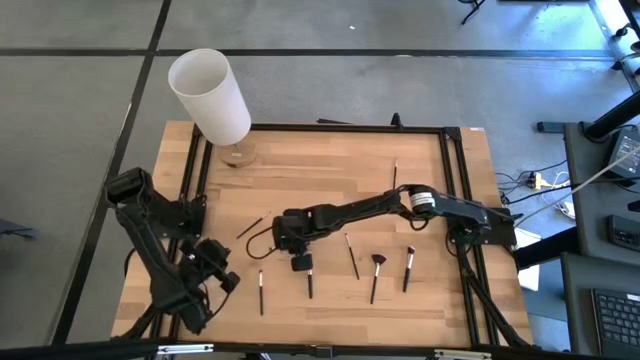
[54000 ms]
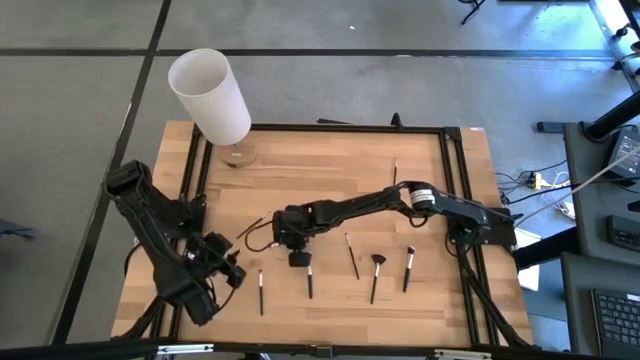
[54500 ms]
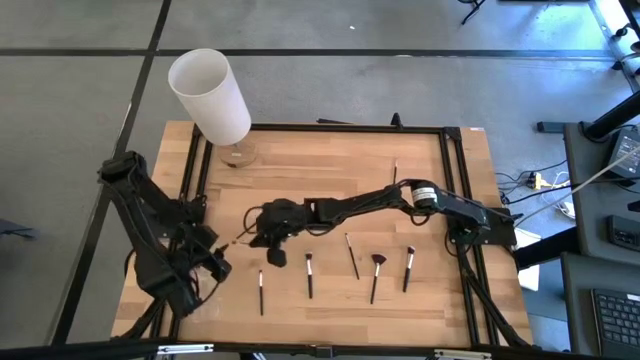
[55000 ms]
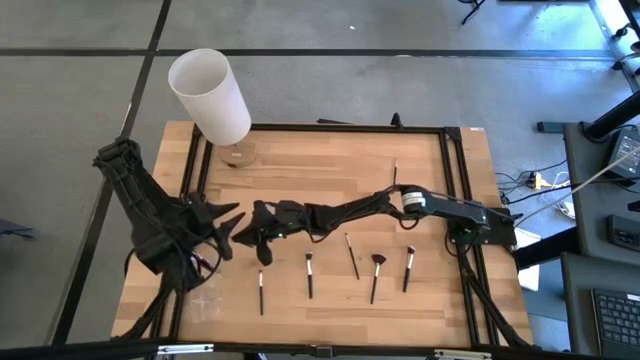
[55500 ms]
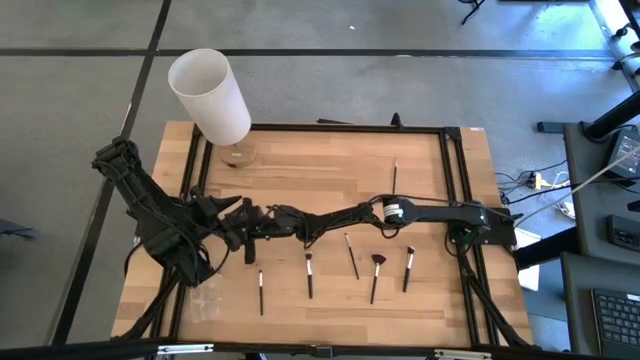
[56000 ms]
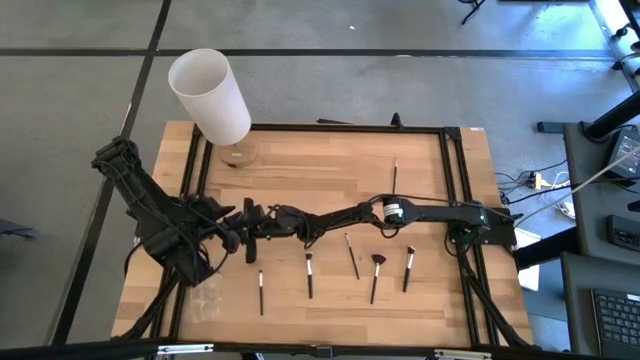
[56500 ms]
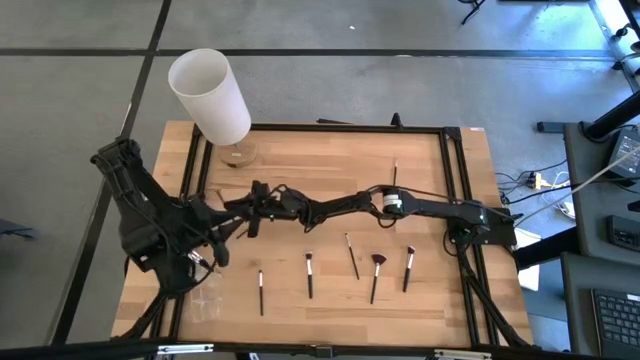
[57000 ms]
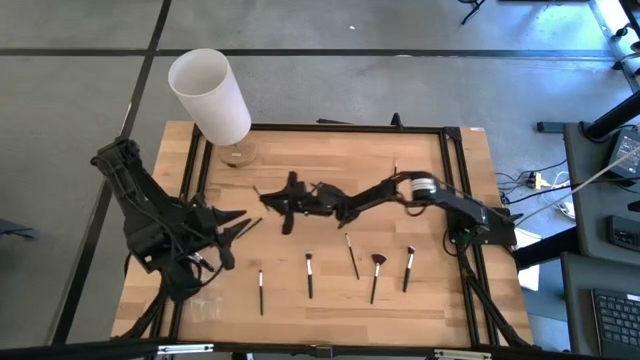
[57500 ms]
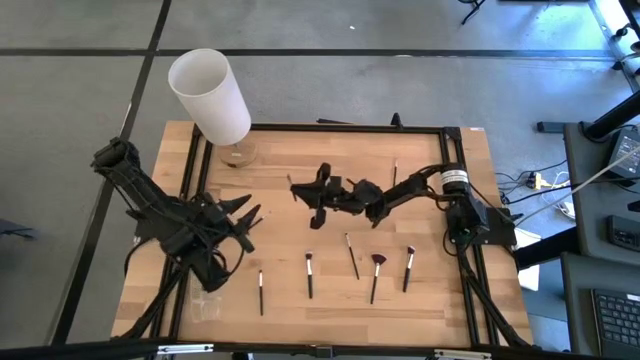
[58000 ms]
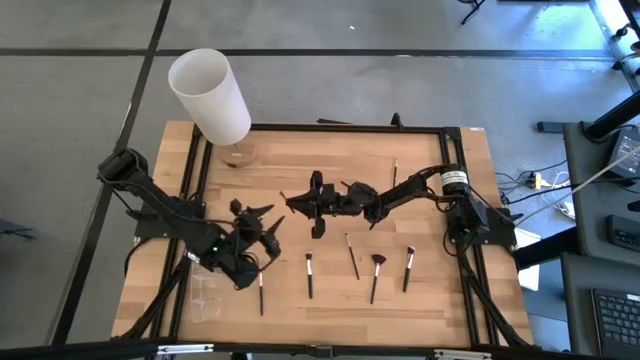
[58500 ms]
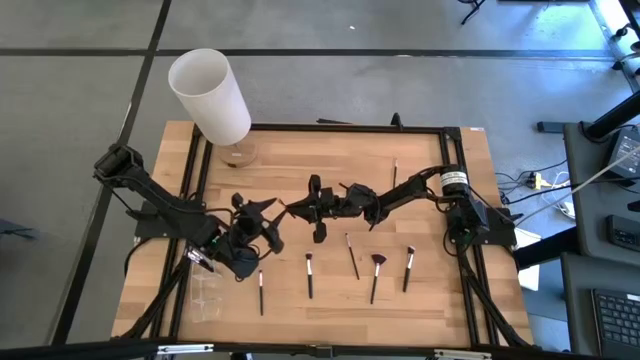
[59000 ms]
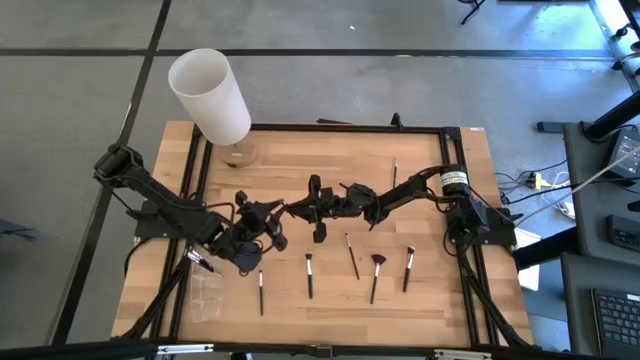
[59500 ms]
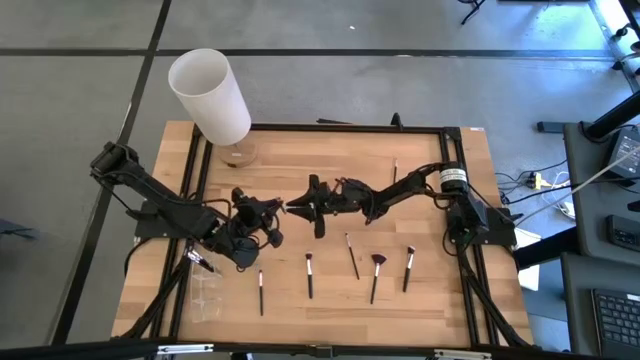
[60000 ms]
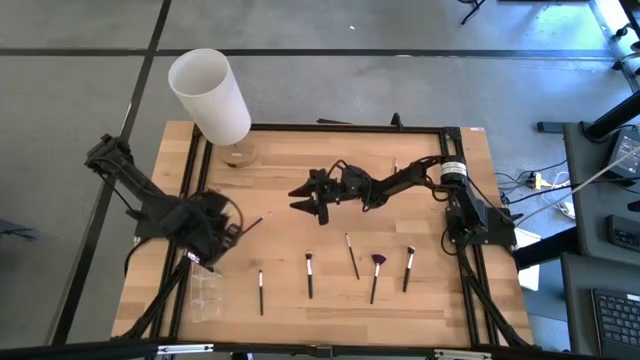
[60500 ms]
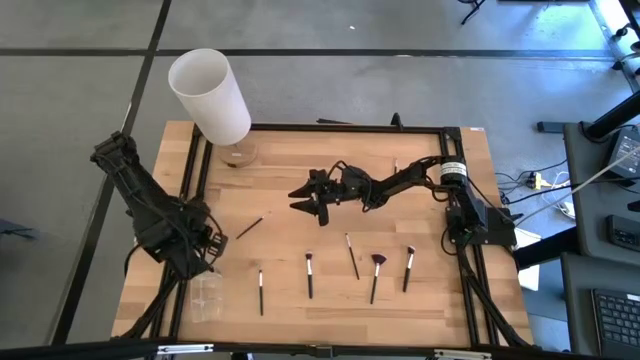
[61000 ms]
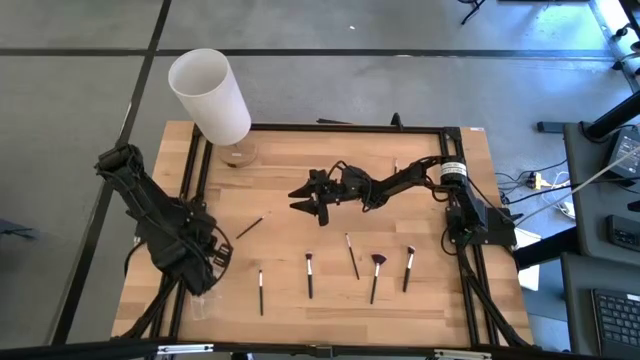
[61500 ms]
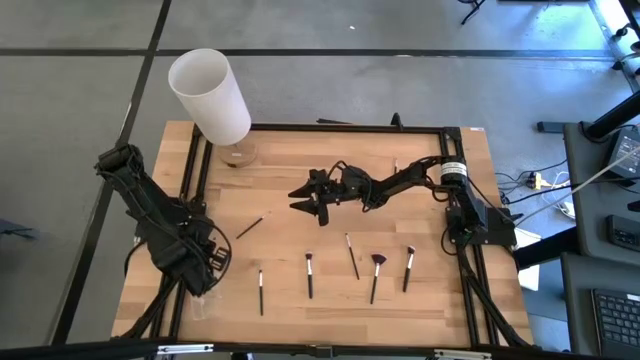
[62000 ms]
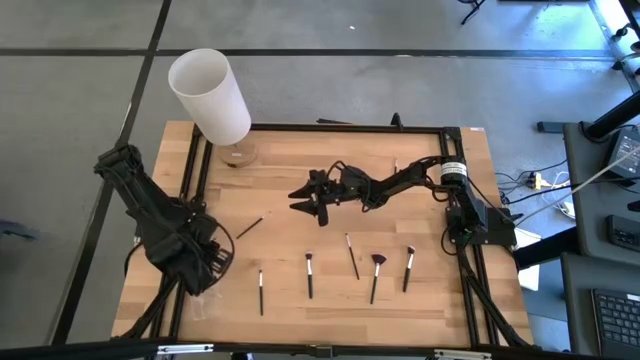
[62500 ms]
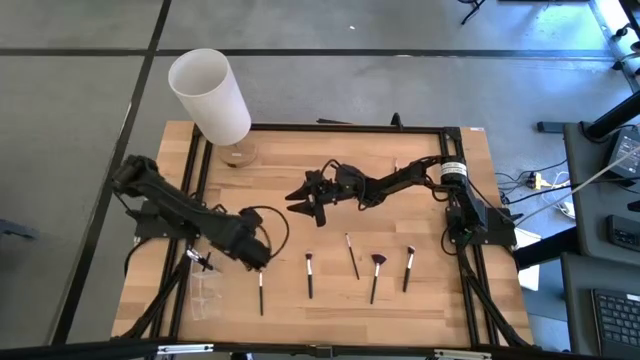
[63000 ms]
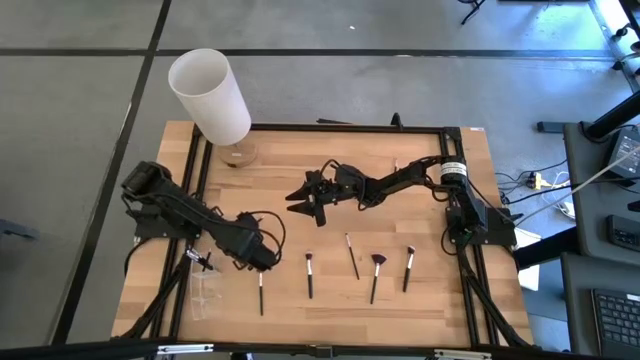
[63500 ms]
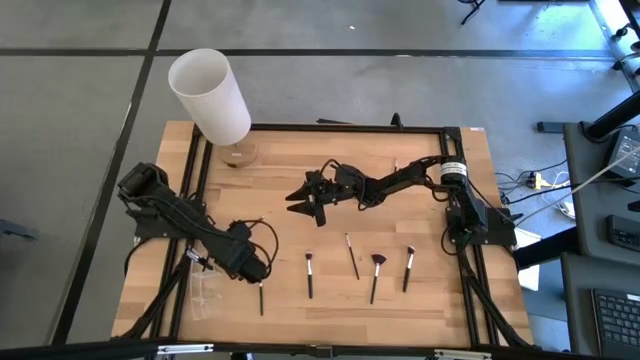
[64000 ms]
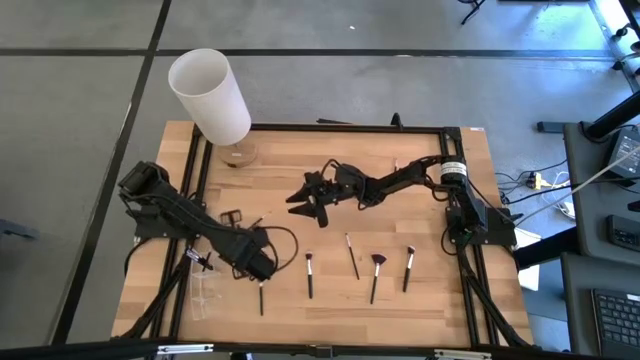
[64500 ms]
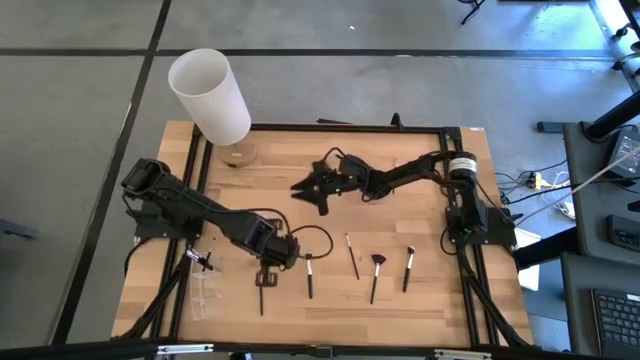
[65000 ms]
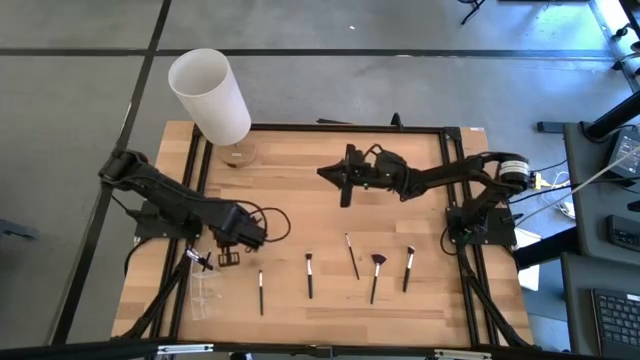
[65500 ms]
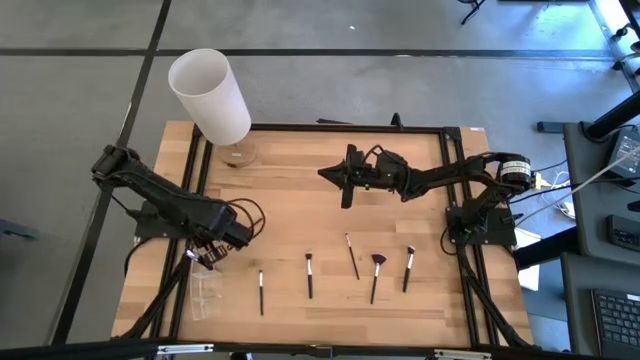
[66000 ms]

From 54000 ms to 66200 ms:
Task: Put items in baskets/containers
Put the eyeshadow brush into the transparent organizer

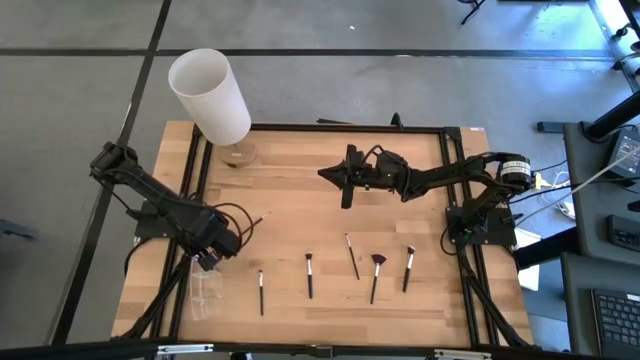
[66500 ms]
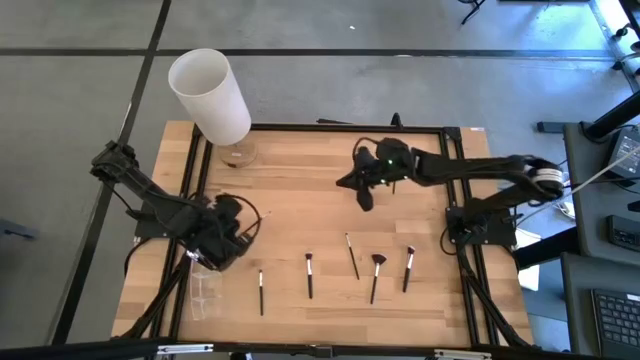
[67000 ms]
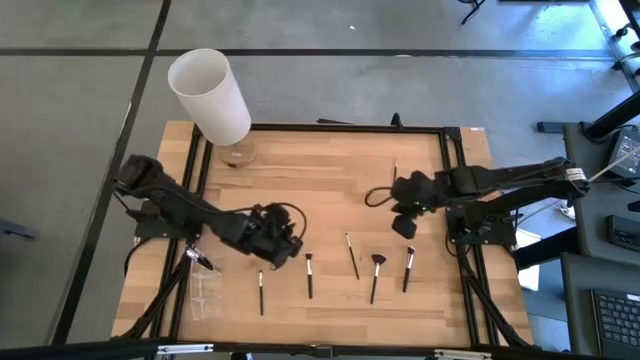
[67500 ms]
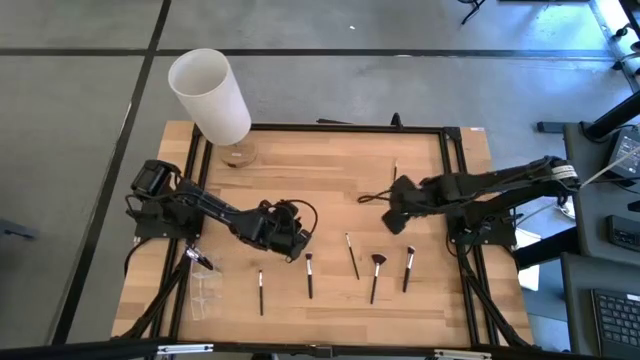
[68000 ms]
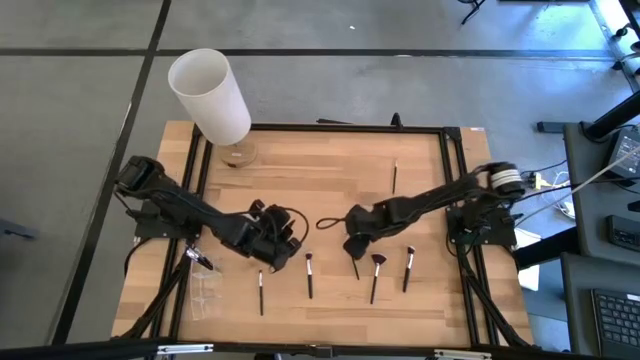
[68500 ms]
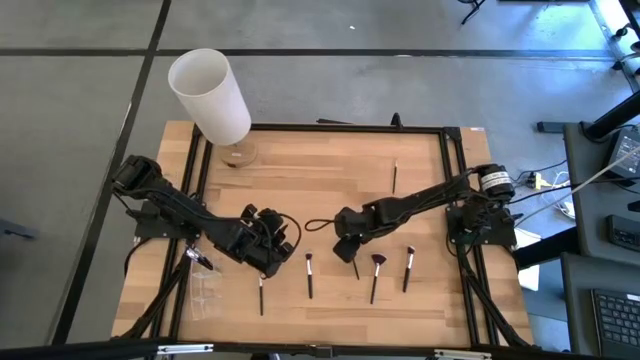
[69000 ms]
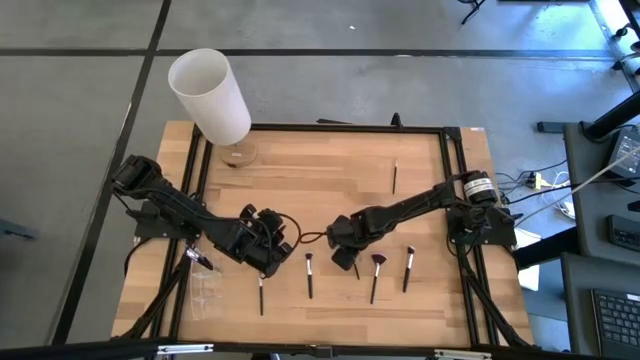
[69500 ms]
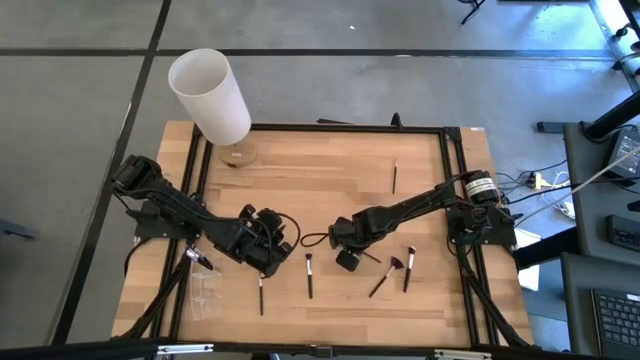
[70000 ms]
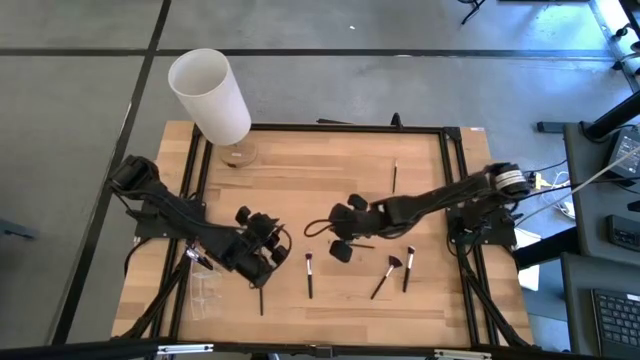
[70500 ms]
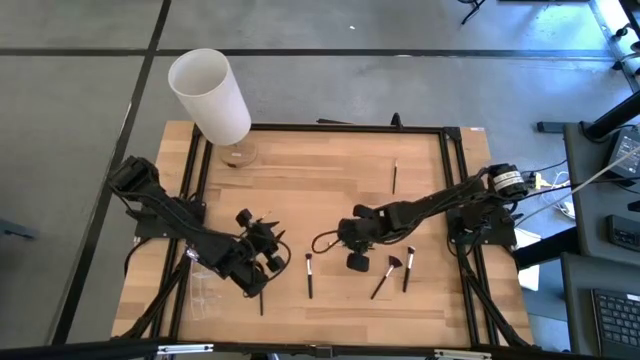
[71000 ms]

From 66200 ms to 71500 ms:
Put the eyeshadow brush into the transparent organizer

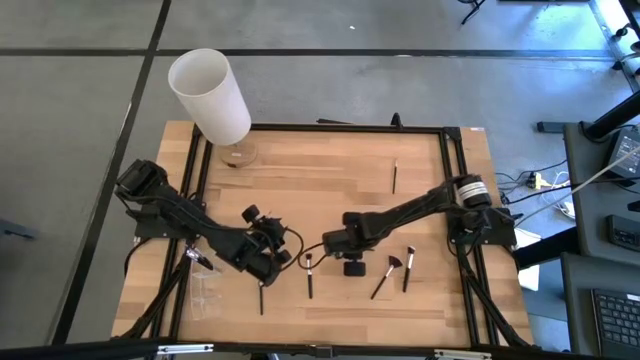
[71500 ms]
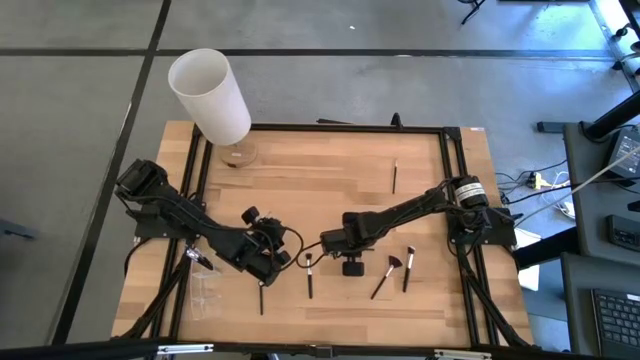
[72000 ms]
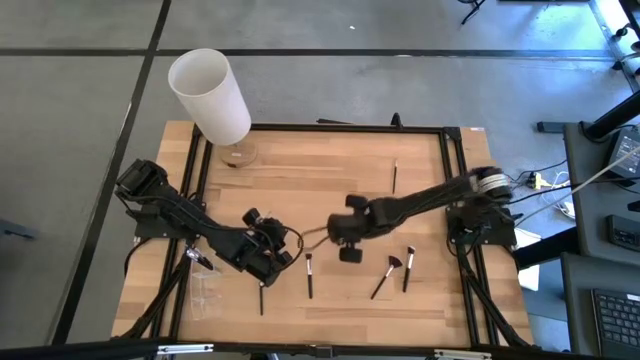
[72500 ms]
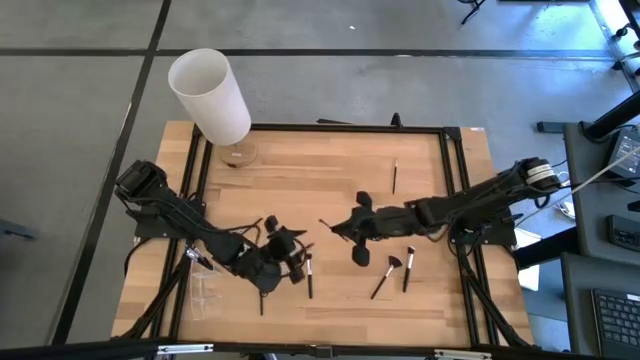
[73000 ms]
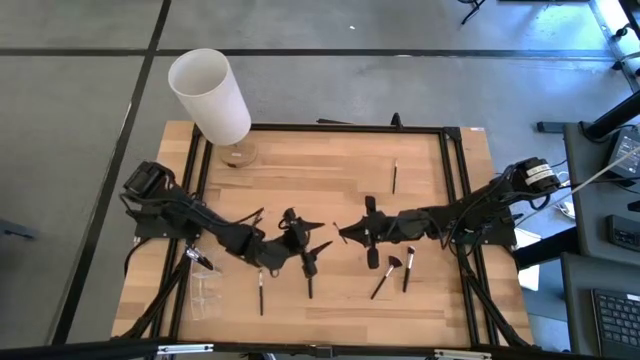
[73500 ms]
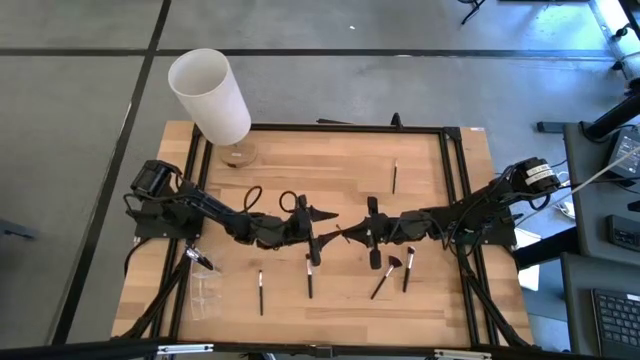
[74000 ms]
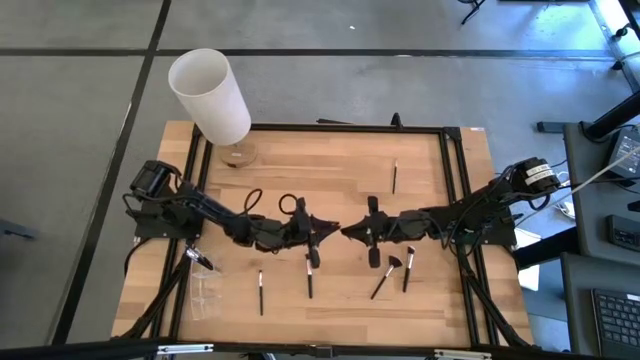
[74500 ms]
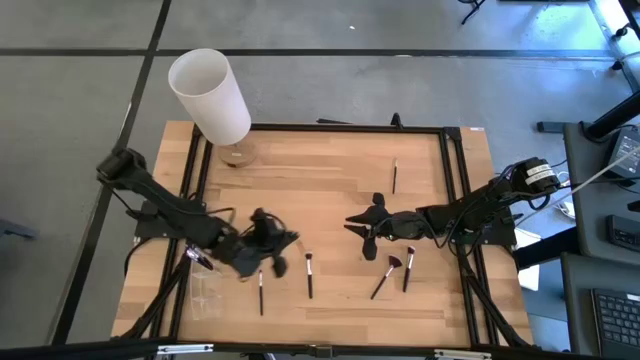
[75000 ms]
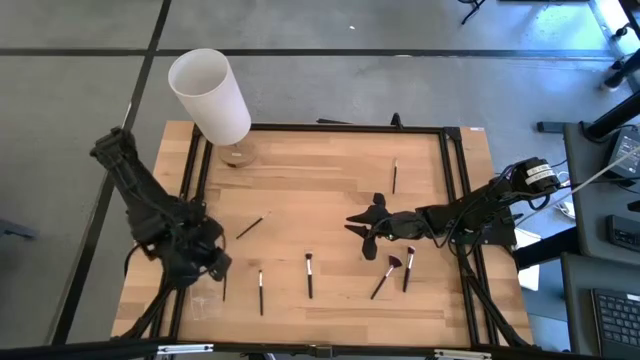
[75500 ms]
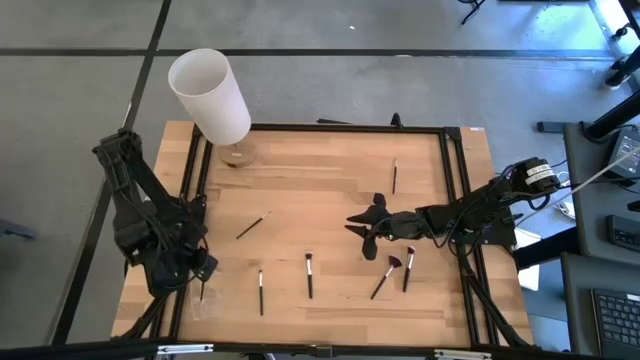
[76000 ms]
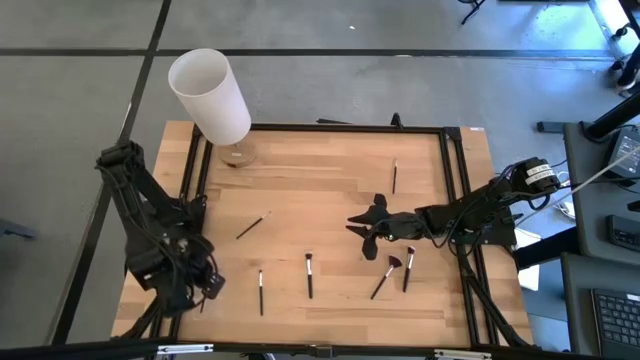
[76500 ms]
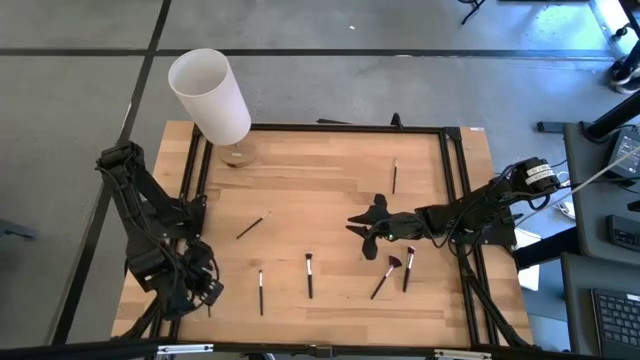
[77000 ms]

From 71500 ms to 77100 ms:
Put the eyeshadow brush into the transparent organizer
